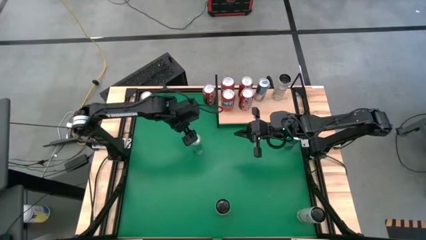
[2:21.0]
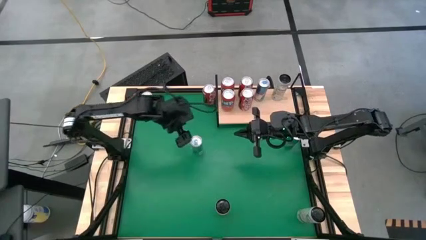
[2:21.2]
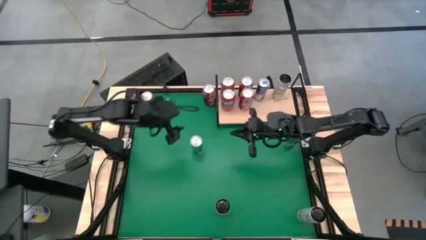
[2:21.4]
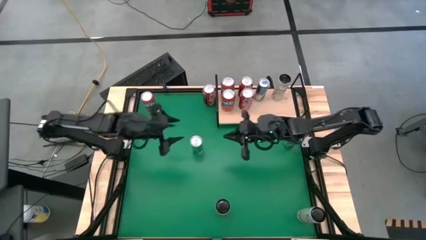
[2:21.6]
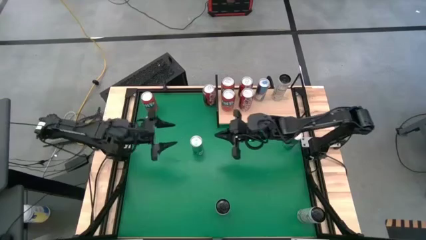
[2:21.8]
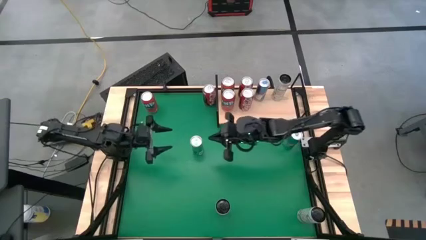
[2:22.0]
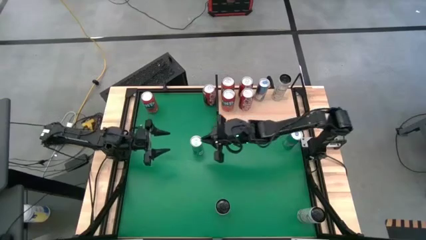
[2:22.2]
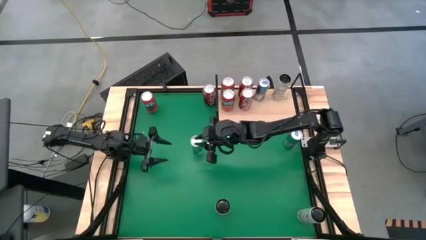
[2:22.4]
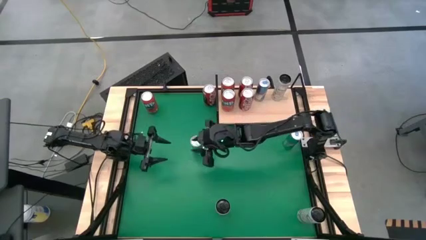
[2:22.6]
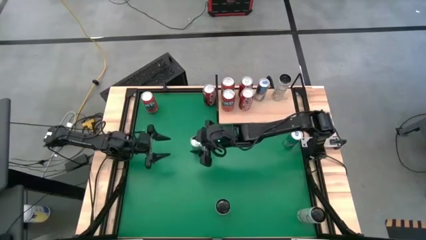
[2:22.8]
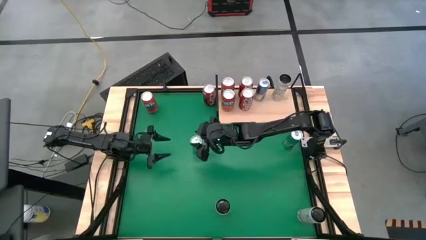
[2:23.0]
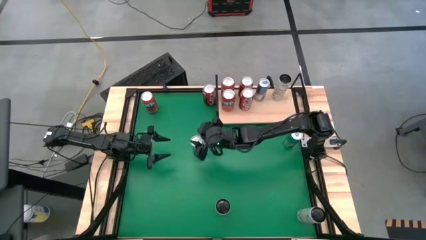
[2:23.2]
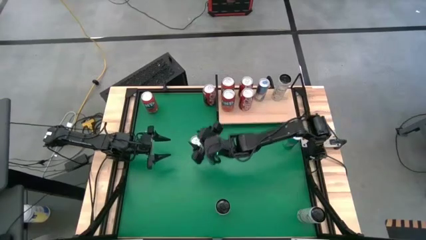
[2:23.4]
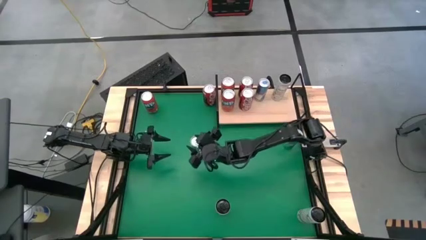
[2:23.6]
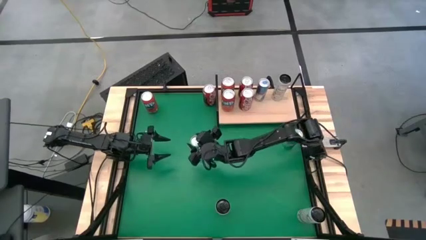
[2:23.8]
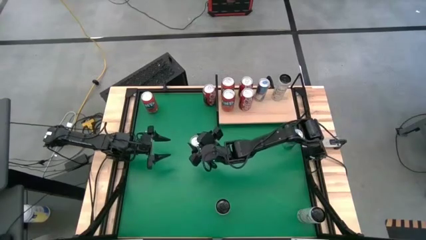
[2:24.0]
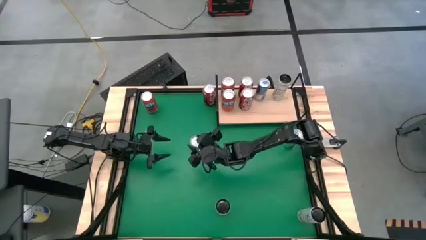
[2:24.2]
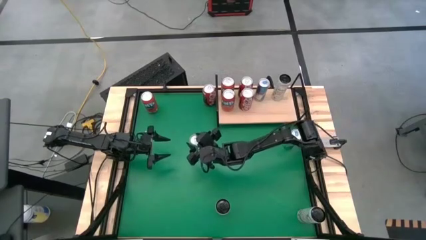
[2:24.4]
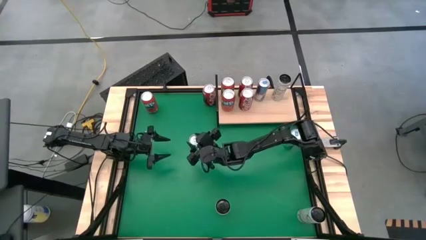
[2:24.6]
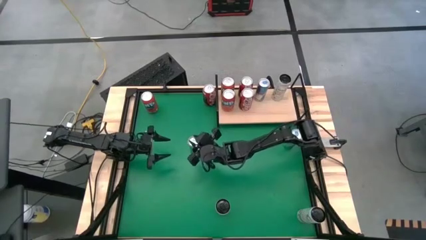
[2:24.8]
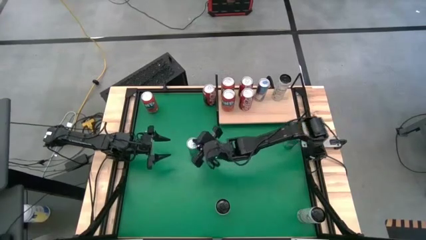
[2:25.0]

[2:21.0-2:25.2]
Task: Place canned beverage on shelf
Put the left blue soda can on the shelf aligned with the other blue soda can

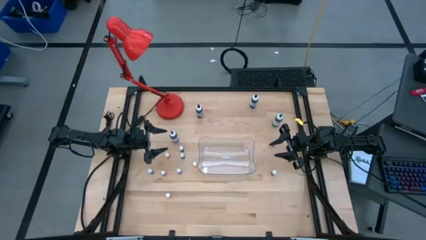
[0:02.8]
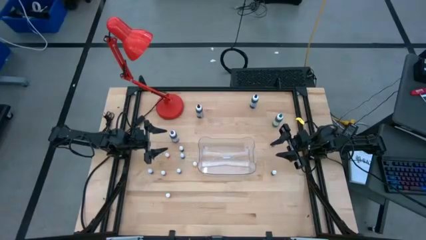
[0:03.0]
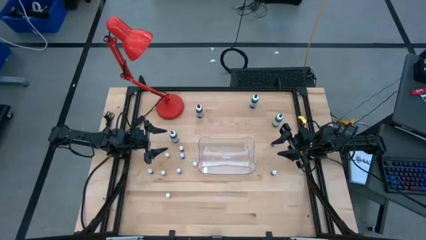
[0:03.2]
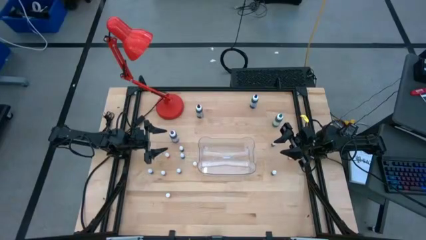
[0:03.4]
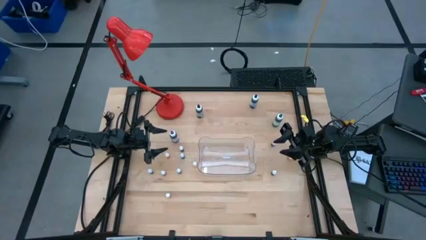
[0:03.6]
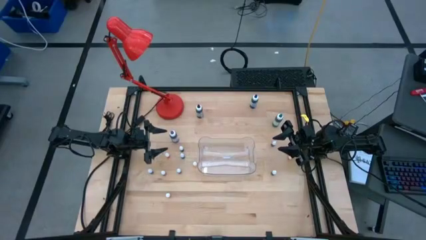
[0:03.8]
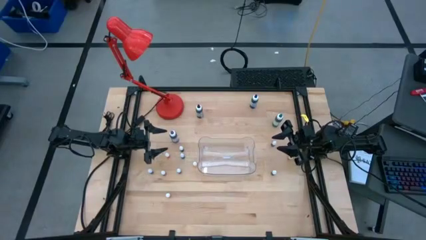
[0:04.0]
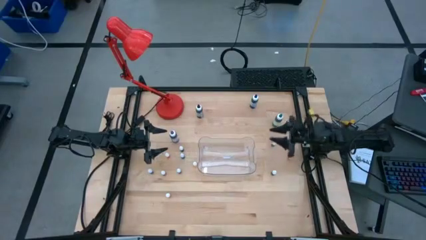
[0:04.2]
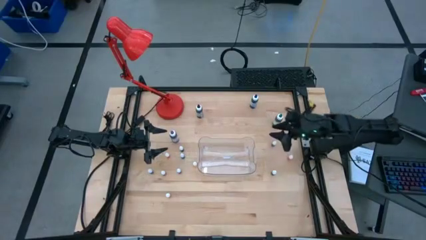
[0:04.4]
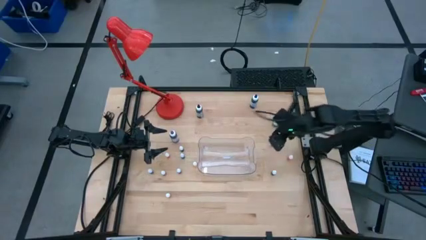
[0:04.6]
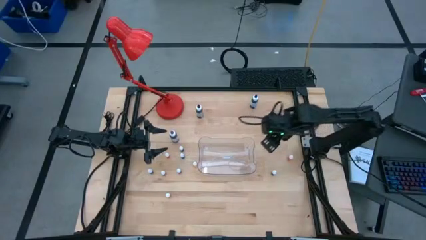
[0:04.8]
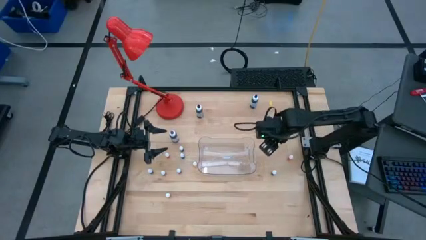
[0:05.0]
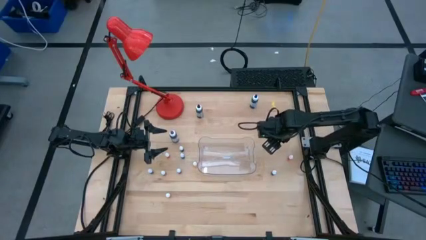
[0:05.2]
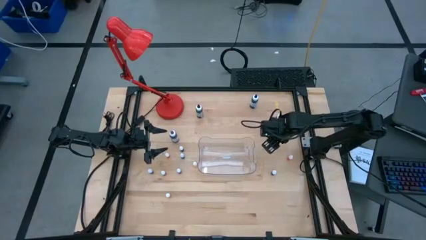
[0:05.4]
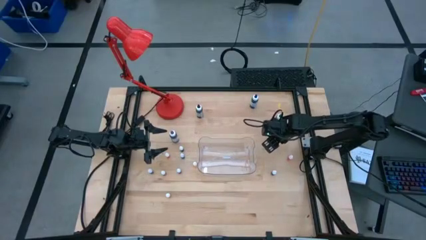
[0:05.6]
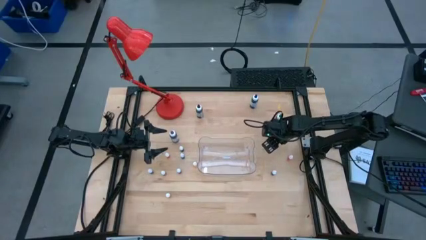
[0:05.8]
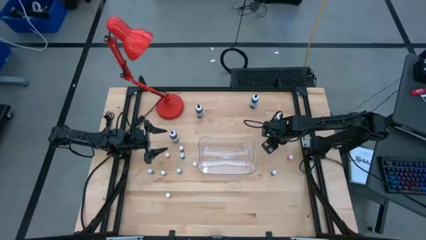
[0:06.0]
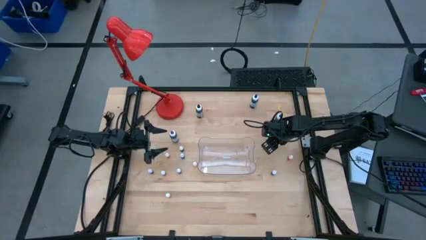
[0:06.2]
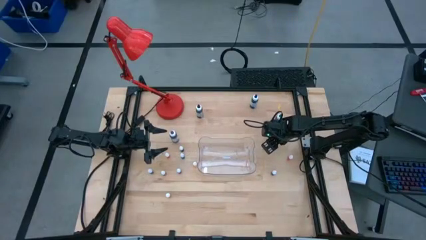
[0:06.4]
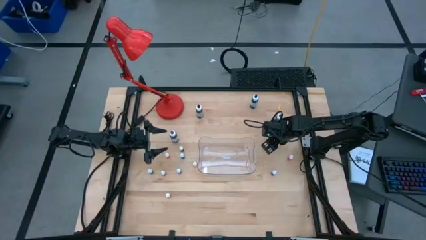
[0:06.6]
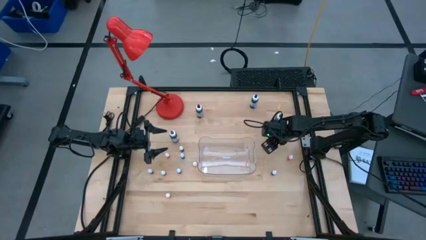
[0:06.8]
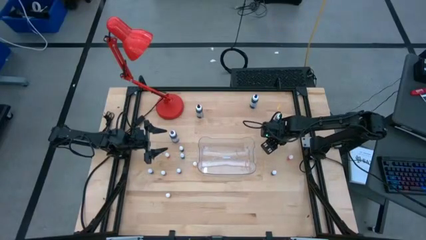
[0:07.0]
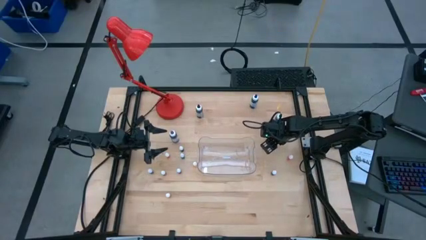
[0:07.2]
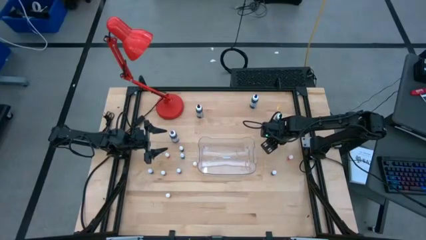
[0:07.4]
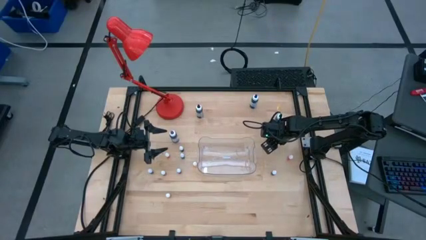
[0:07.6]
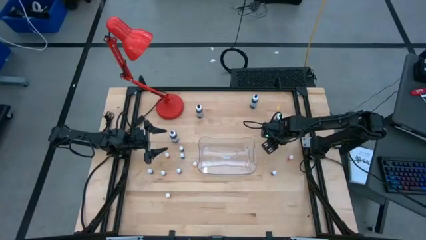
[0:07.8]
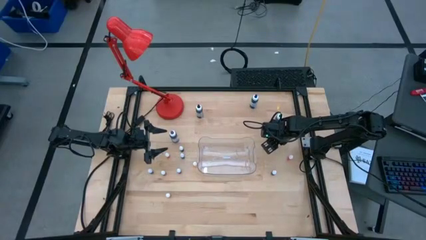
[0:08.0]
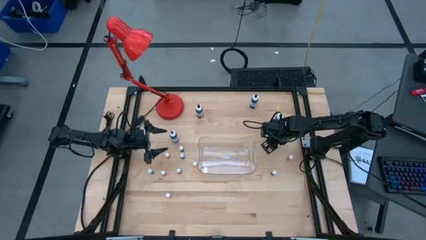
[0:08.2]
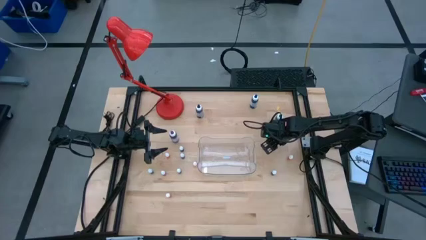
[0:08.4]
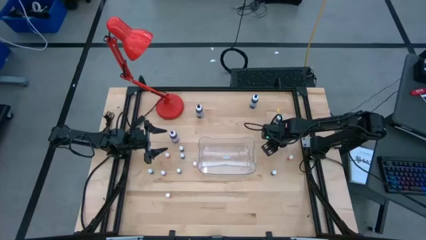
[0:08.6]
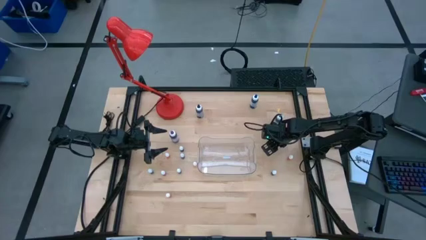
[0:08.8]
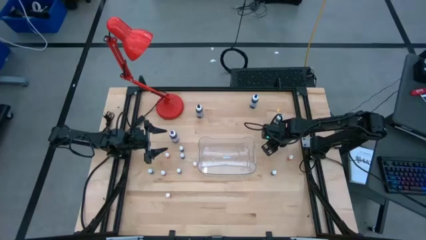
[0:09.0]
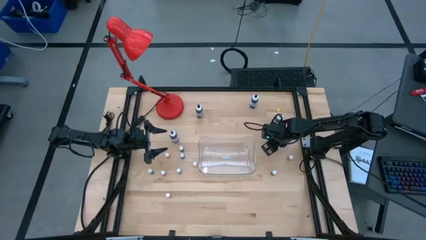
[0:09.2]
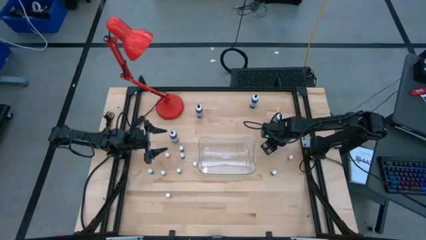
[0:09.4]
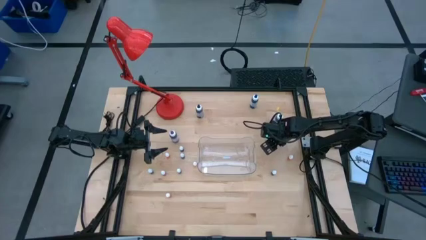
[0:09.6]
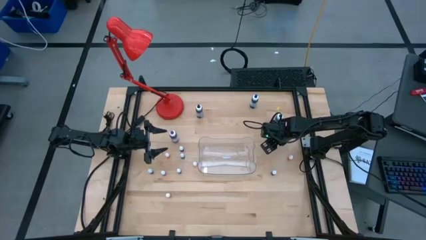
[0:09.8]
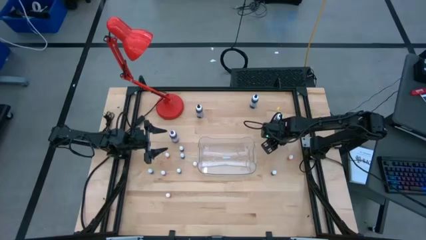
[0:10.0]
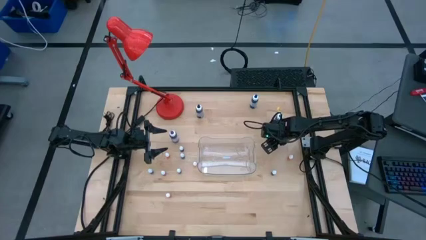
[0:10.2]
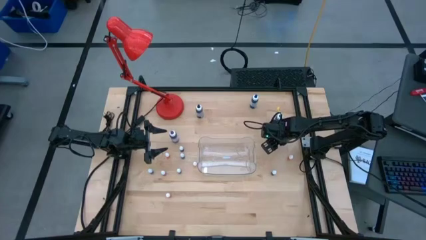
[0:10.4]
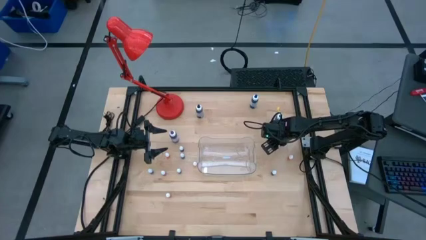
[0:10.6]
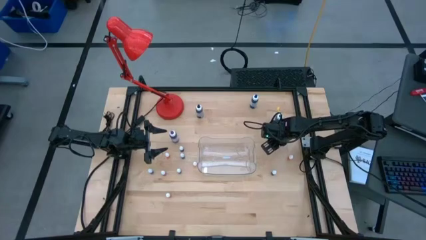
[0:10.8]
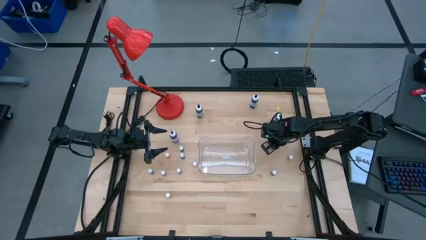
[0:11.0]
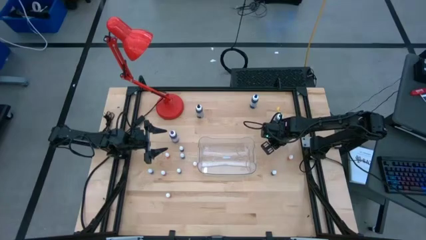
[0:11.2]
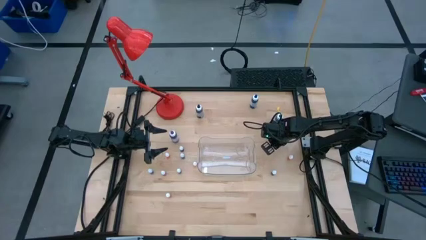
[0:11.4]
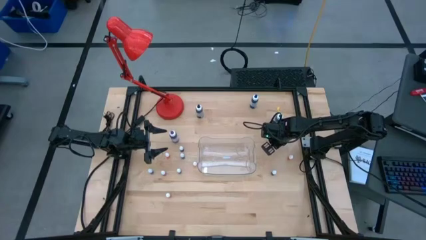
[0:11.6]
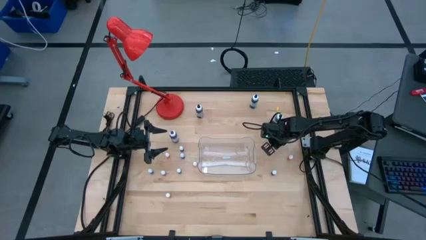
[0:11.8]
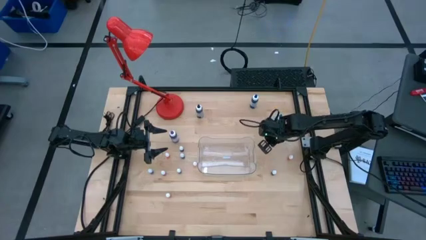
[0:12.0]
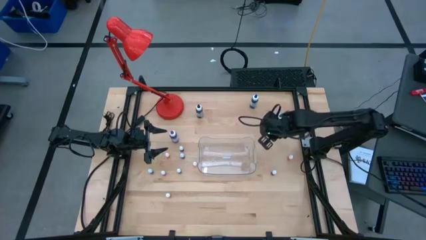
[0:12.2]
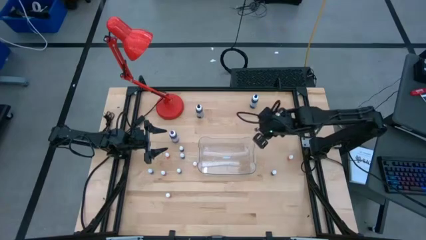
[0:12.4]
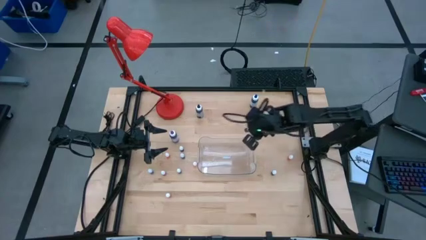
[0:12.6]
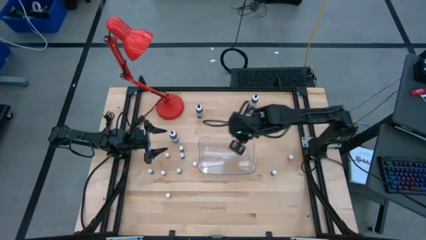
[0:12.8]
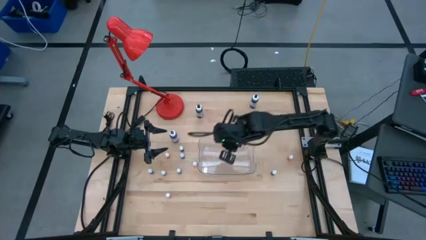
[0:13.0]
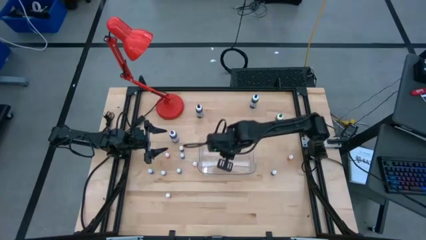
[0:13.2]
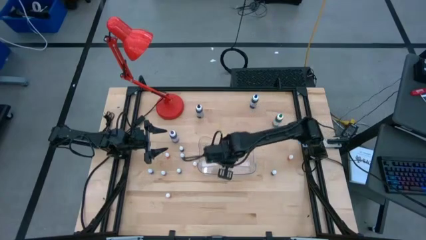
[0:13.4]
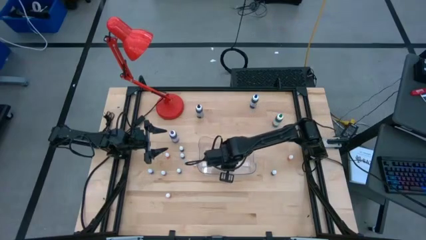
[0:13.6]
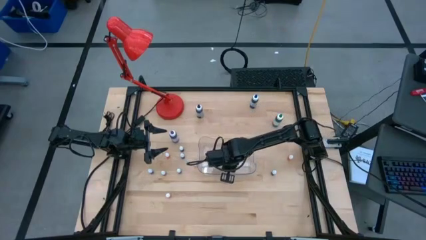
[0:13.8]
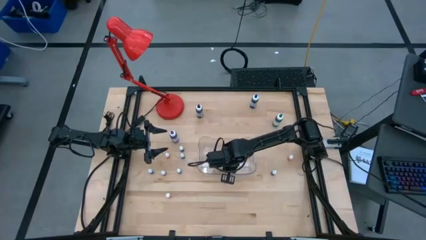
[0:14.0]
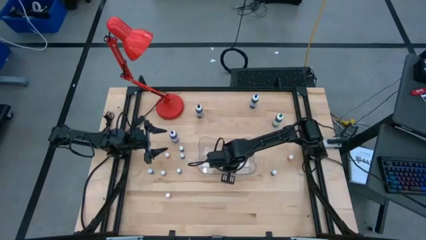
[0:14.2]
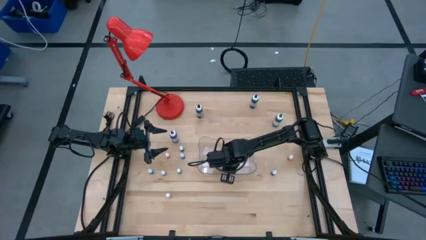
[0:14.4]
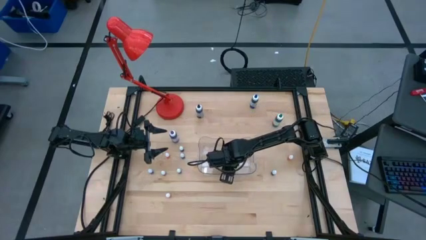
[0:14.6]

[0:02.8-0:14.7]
Task: Pick & Place food coloring
Put the top small purple food coloring bottle into the transparent bin
